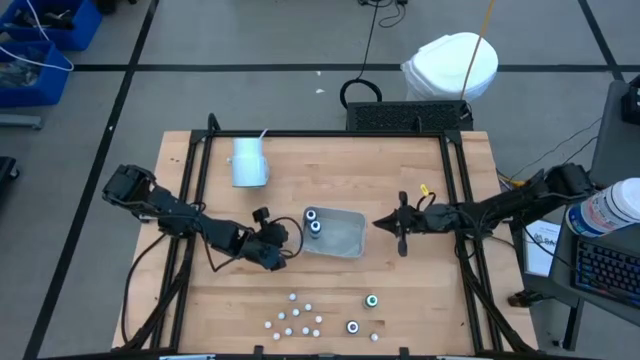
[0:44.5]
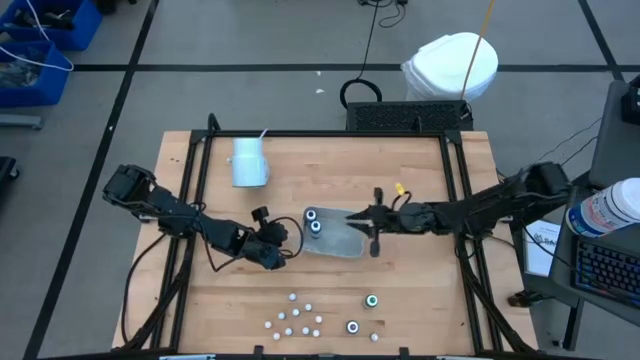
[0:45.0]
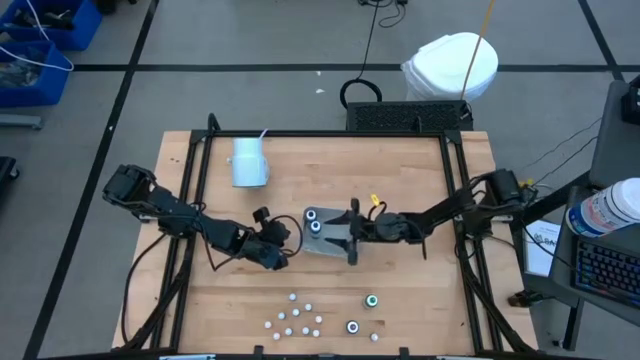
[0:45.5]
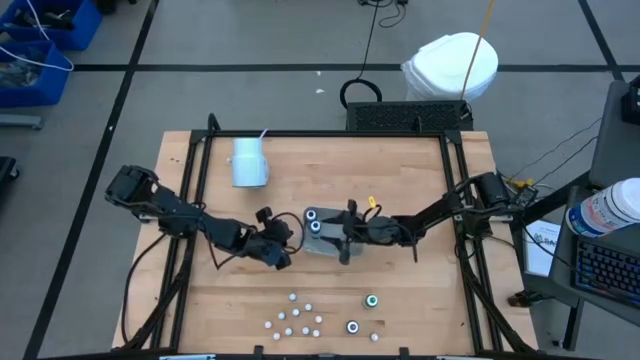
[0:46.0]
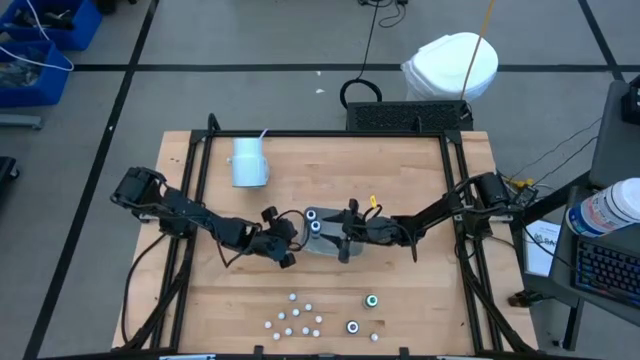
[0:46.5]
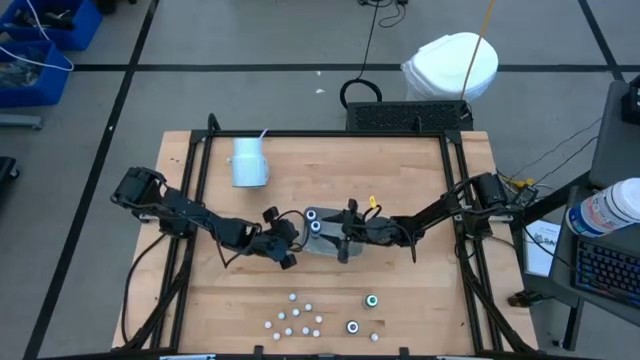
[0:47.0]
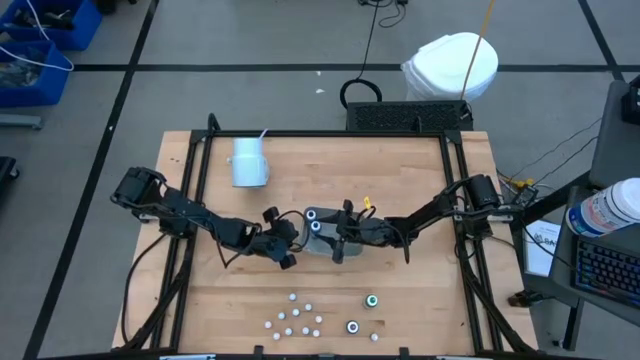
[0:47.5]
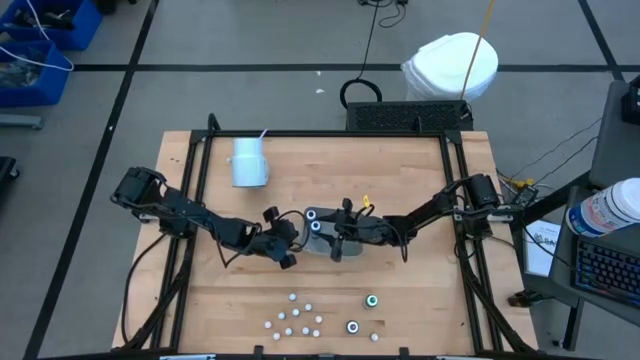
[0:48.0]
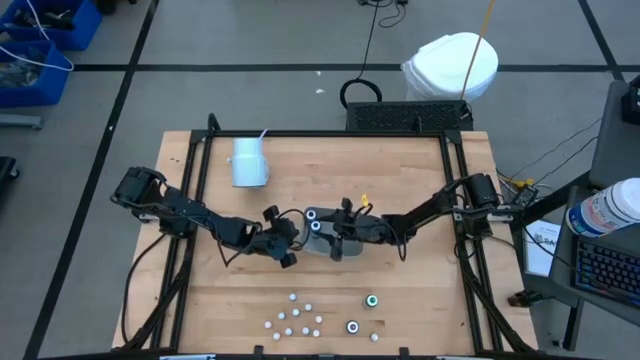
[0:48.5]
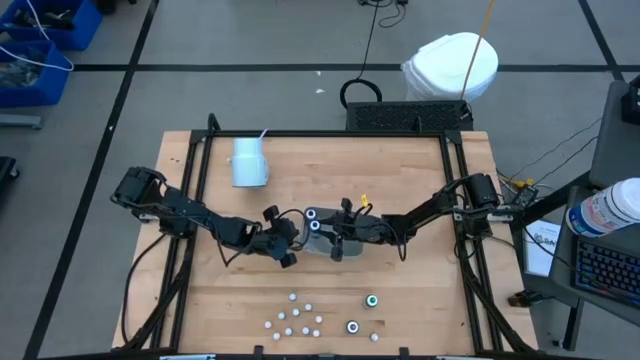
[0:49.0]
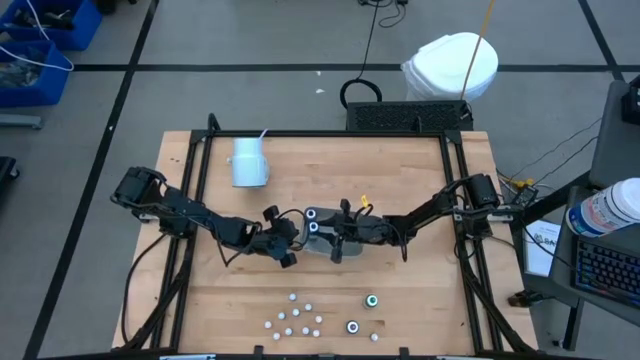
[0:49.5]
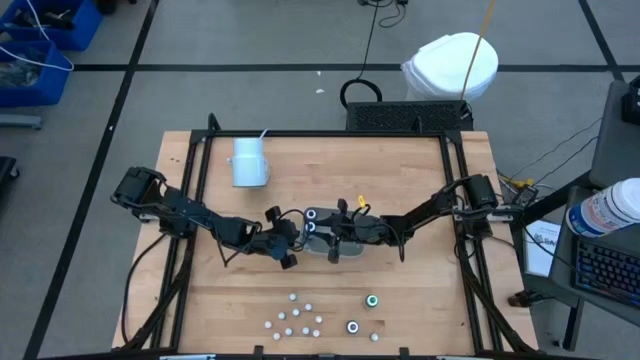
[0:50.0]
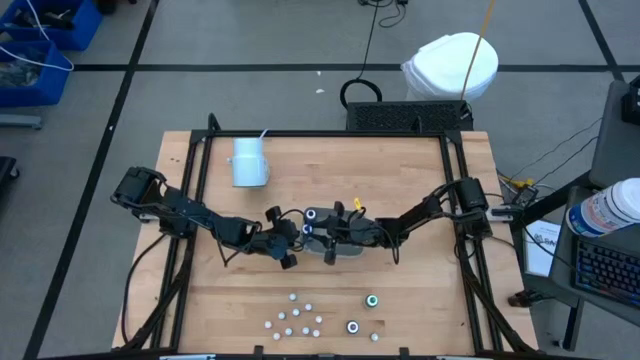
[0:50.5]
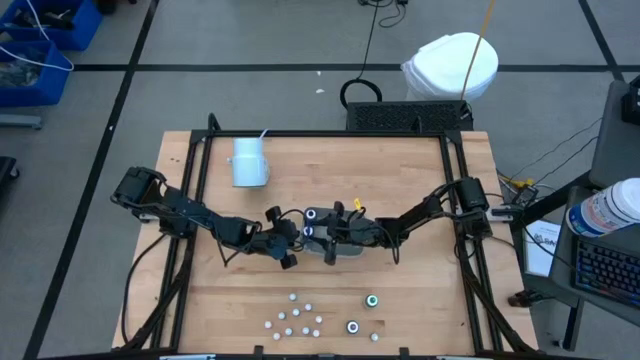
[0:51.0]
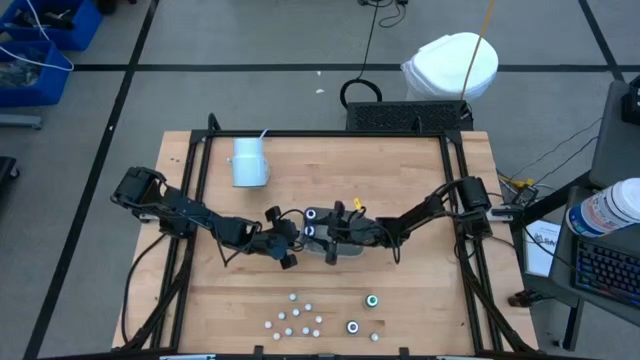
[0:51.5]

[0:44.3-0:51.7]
Task: Pick & Place food coloring
Adjust the large blue food coloring bottle in the white container

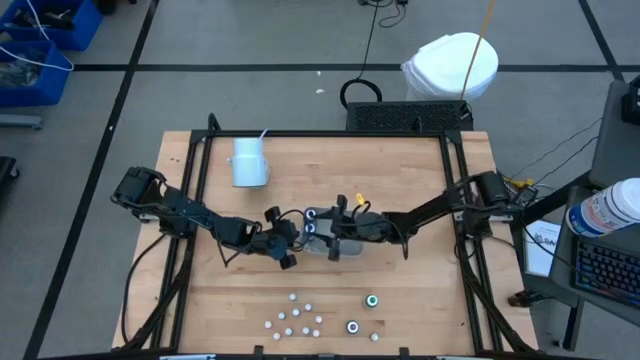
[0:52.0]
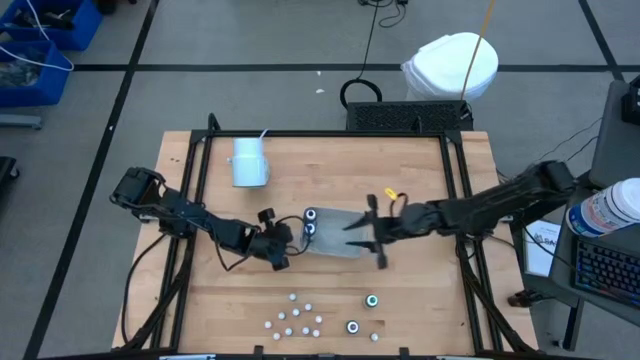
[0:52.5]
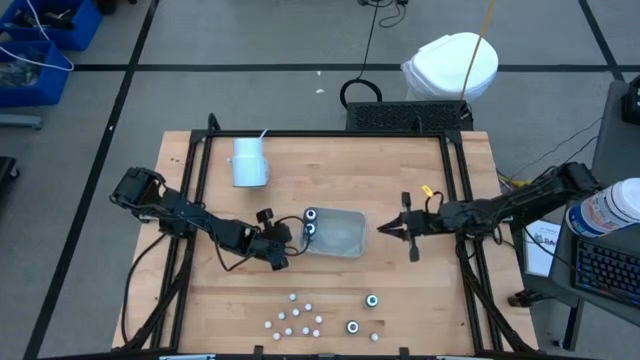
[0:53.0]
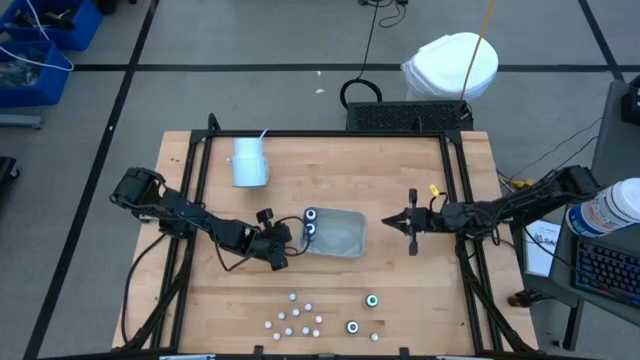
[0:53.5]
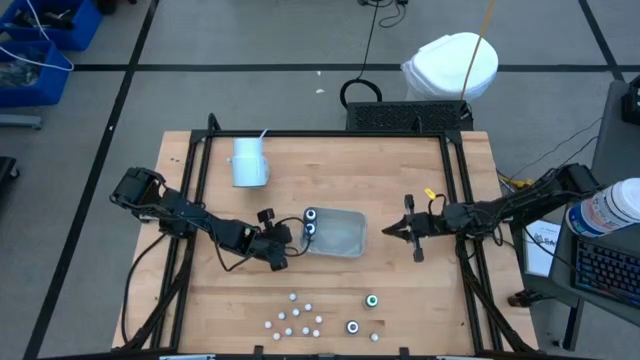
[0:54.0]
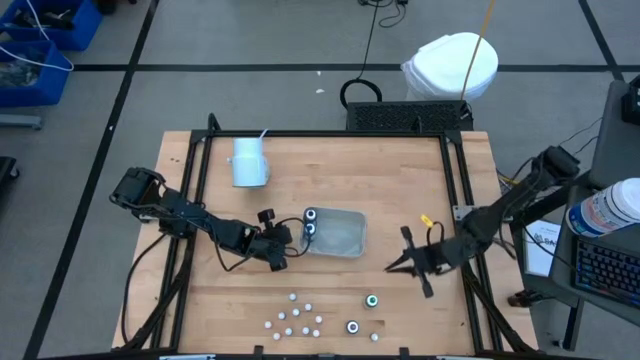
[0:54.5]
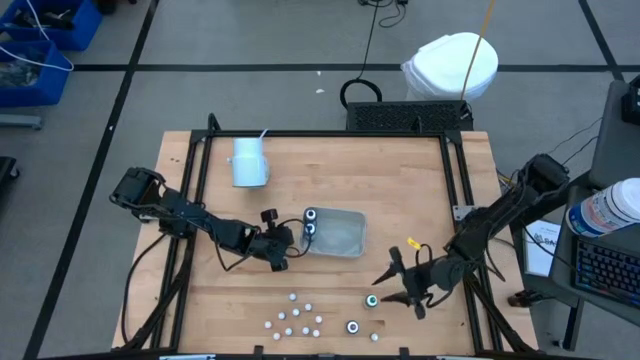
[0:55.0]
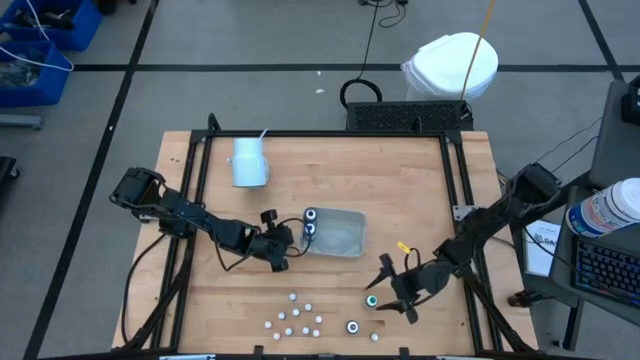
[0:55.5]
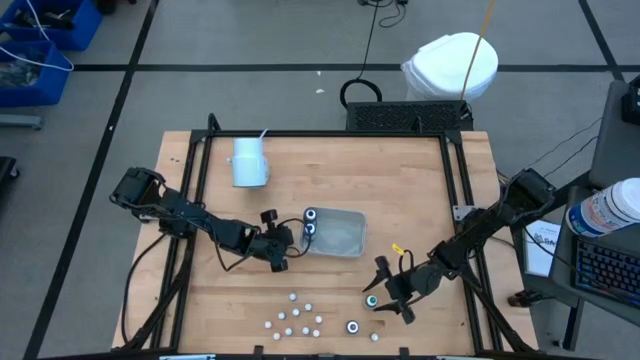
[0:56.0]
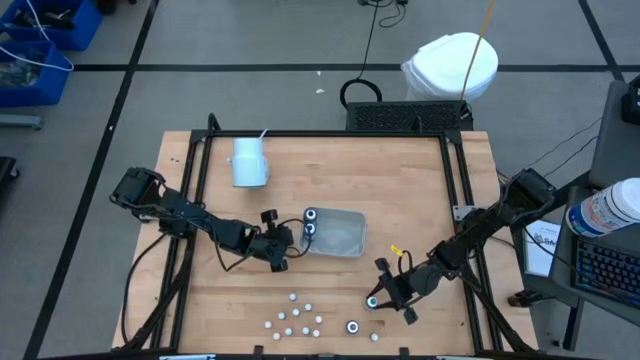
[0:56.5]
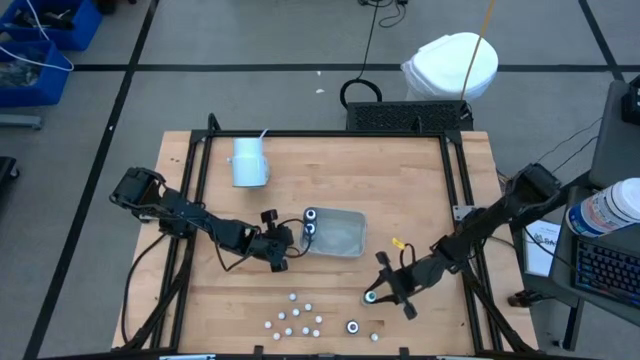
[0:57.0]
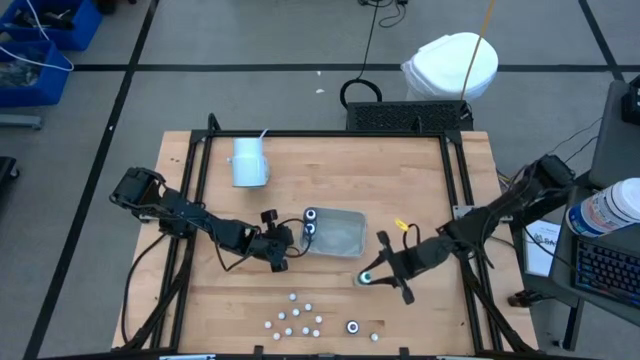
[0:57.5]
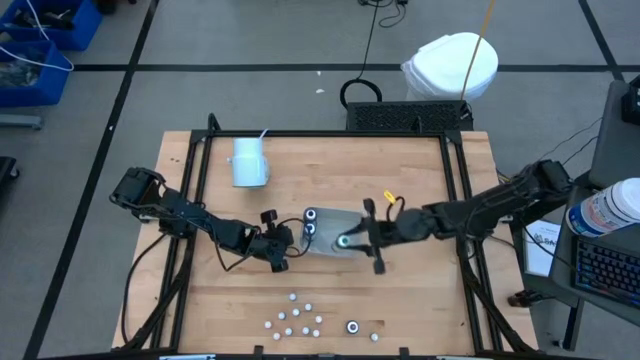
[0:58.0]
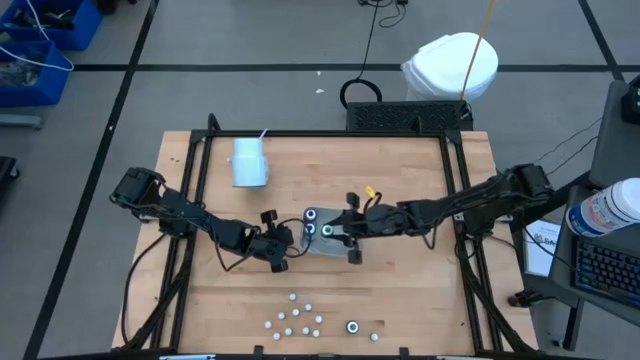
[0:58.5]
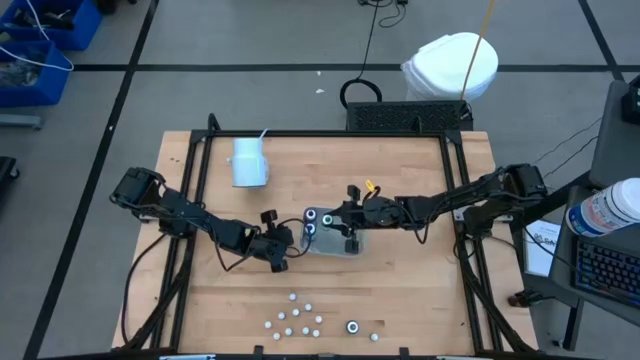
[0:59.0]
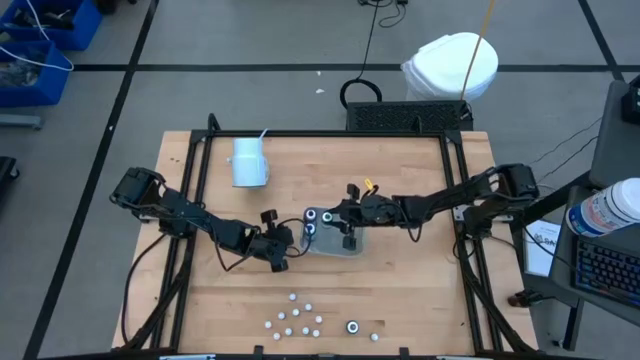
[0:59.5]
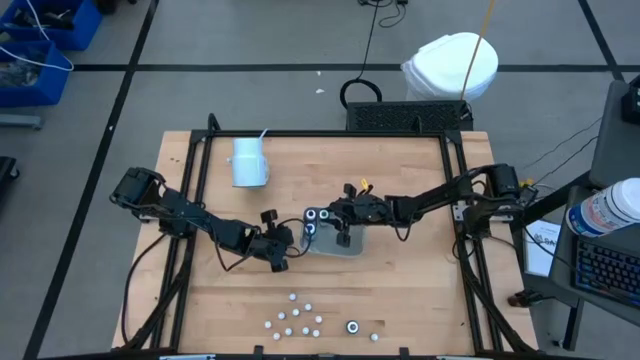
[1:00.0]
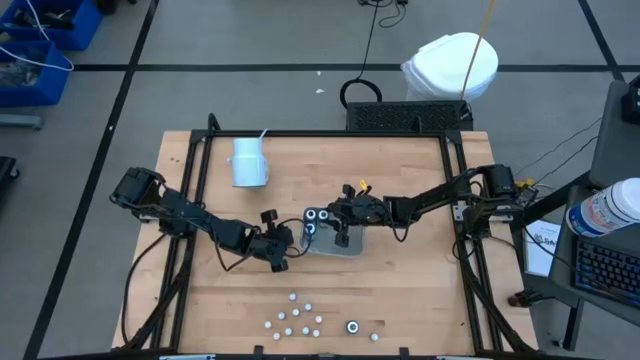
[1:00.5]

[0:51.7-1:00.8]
Put the large green food coloring bottle into the white container

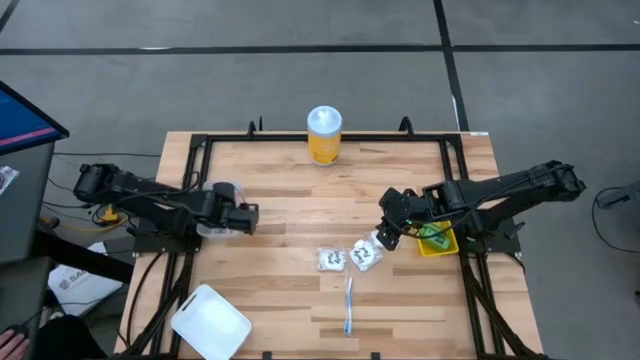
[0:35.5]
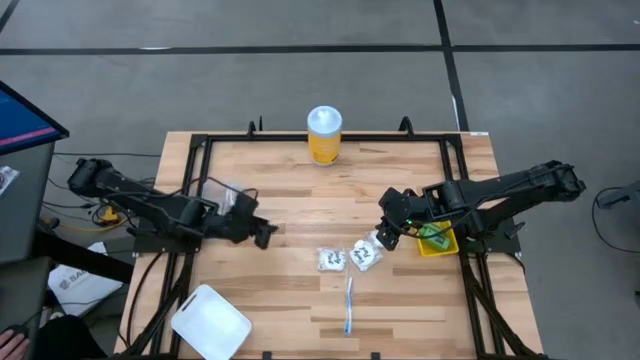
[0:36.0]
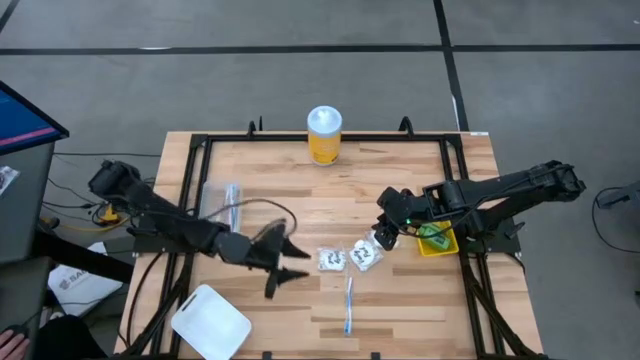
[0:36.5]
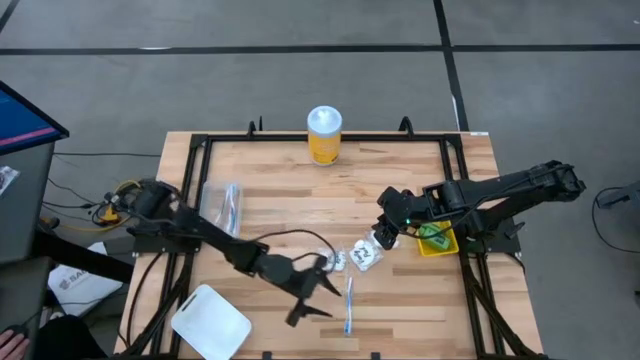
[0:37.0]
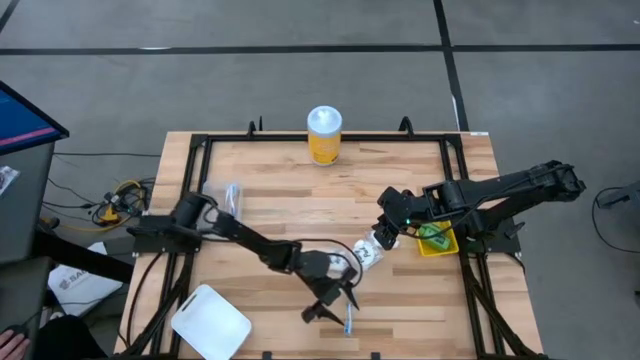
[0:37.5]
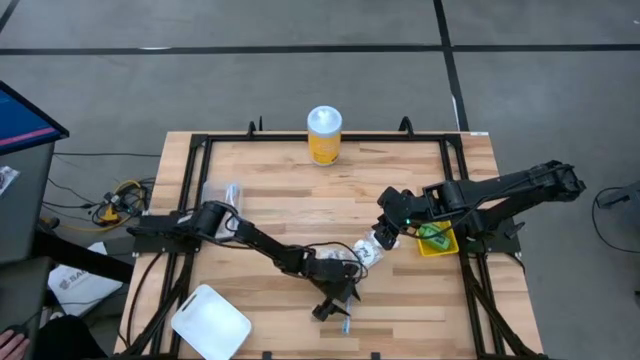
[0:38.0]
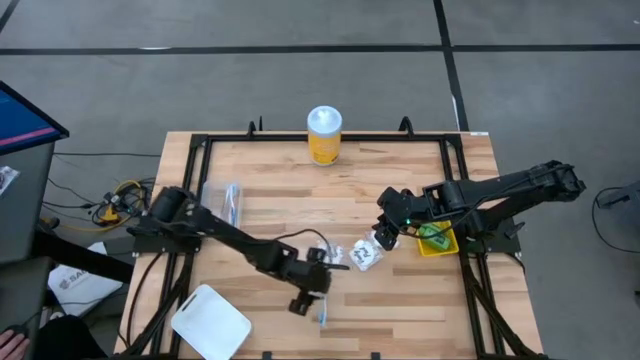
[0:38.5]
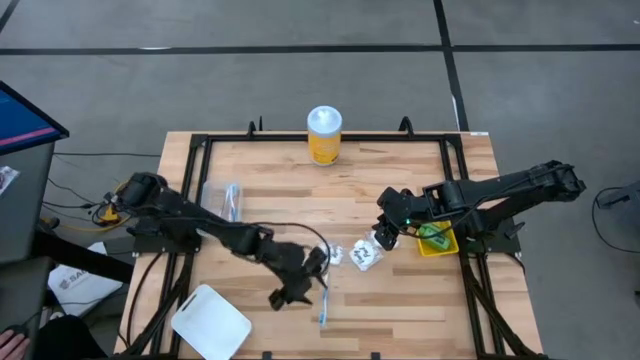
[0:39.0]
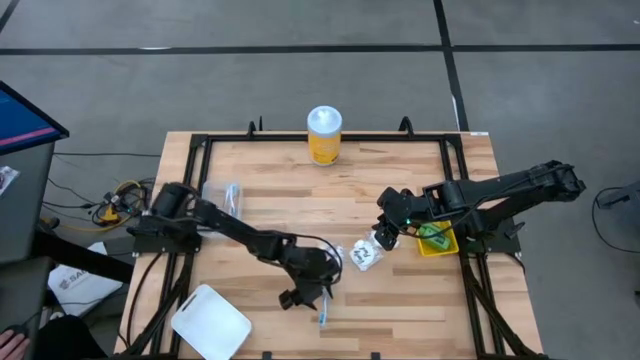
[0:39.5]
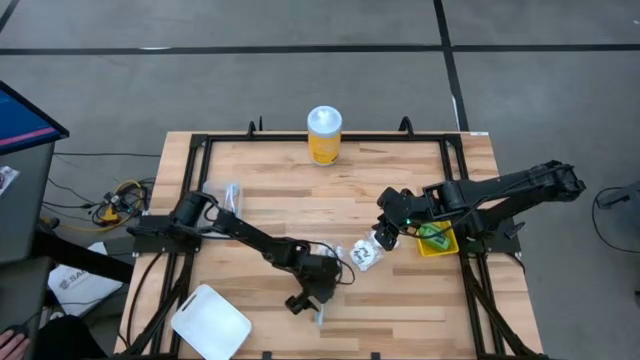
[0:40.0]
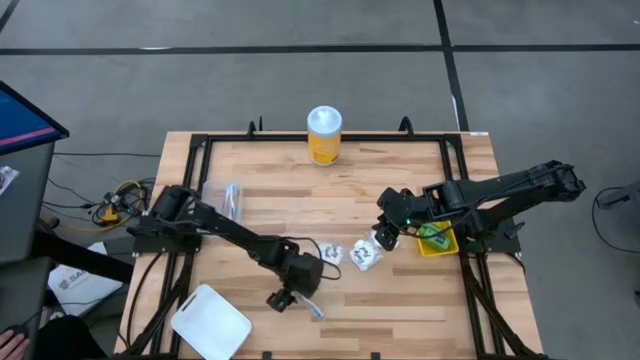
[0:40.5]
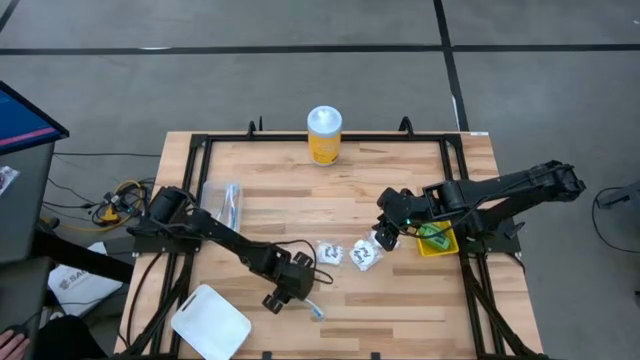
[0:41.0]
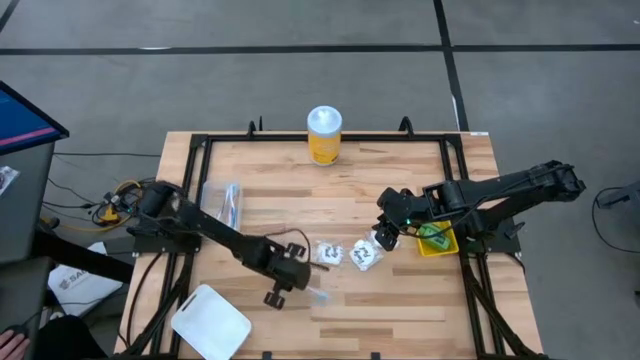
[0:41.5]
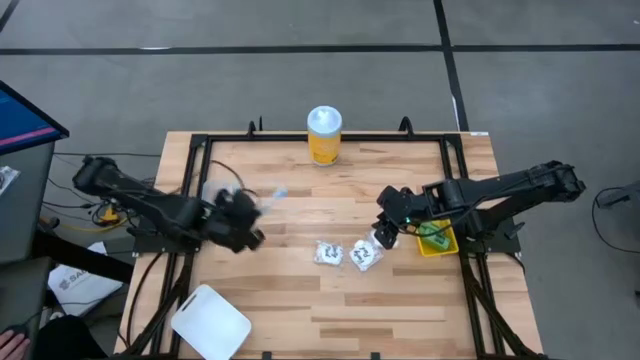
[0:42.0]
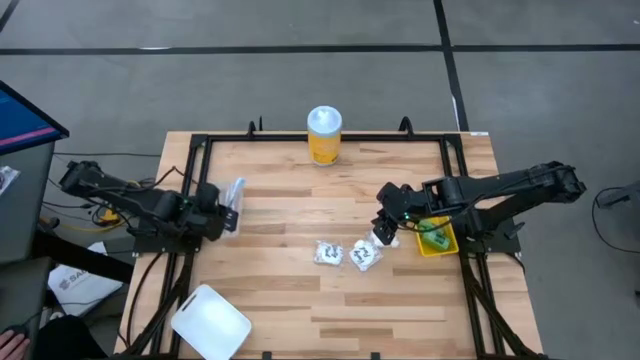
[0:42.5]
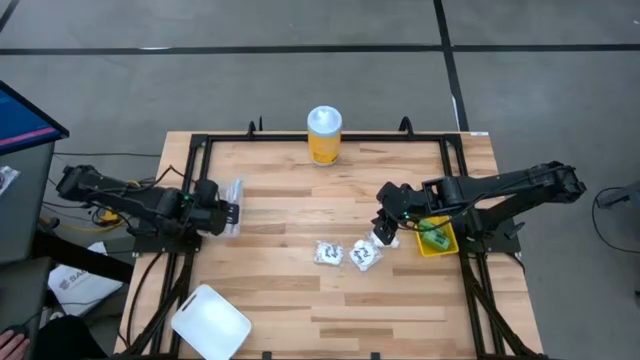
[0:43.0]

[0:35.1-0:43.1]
Task: Pick & Place Travel size toiletries
Put the blue toothbrush into the transparent bin
